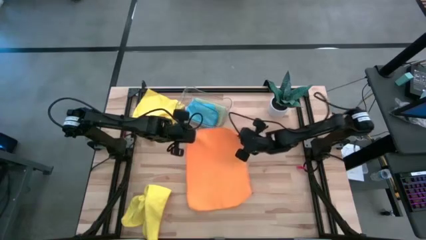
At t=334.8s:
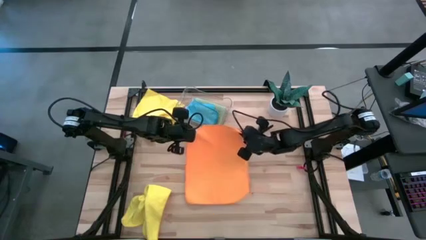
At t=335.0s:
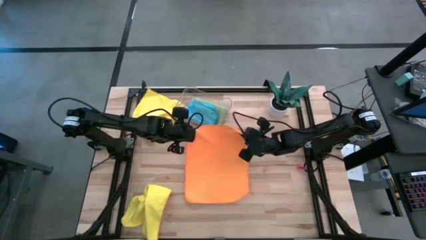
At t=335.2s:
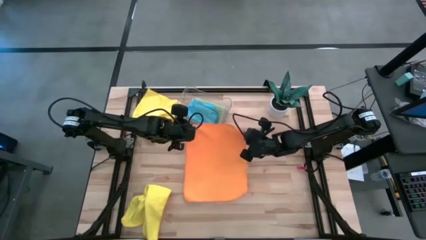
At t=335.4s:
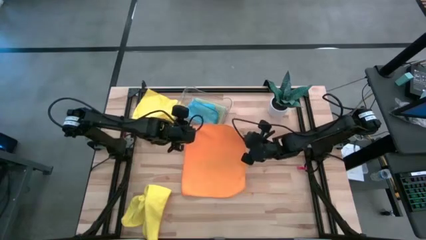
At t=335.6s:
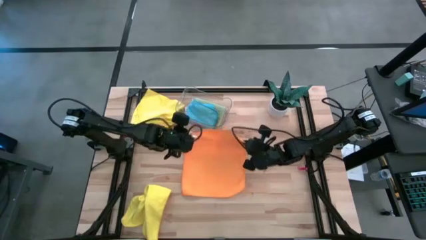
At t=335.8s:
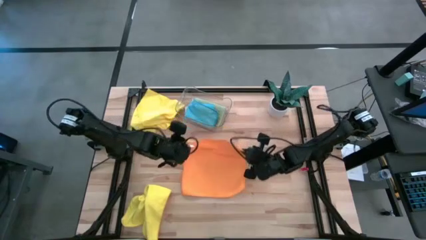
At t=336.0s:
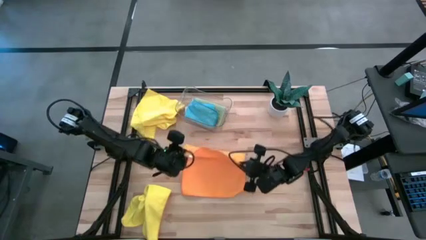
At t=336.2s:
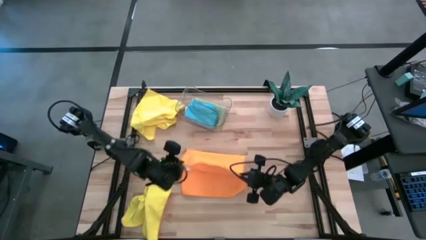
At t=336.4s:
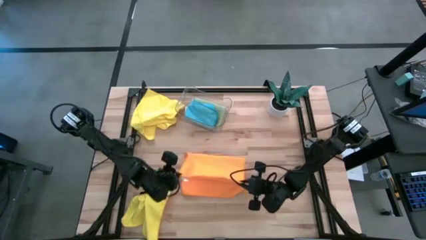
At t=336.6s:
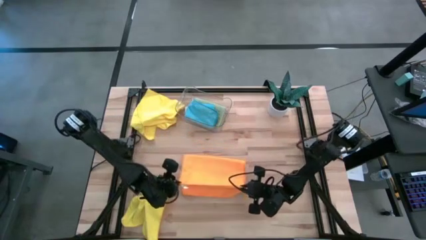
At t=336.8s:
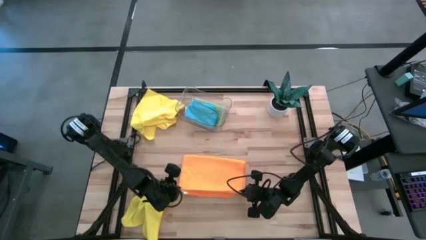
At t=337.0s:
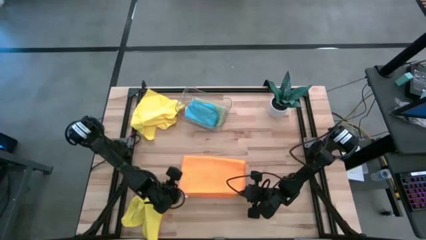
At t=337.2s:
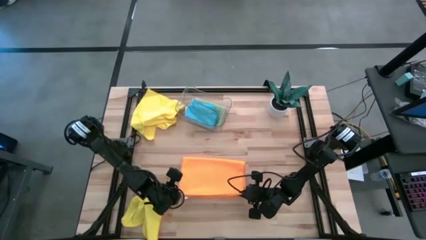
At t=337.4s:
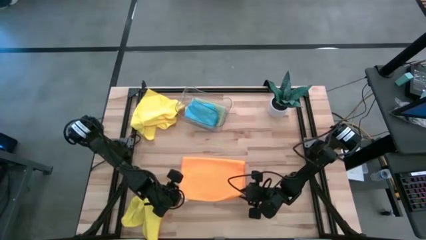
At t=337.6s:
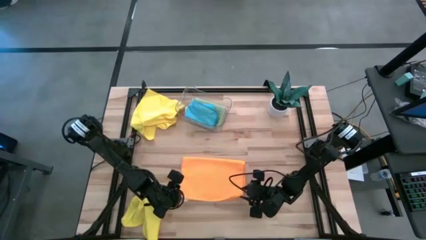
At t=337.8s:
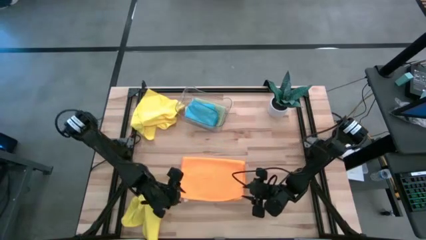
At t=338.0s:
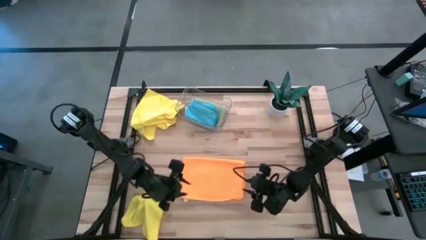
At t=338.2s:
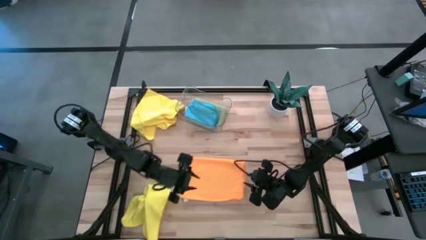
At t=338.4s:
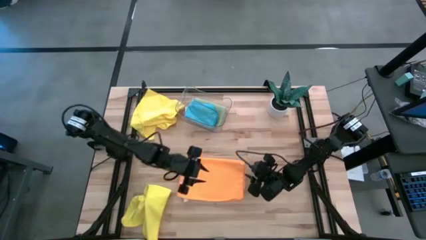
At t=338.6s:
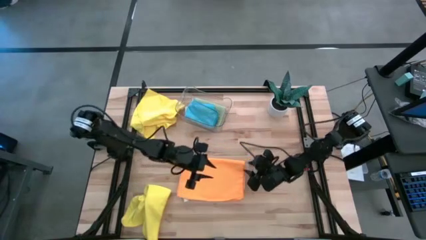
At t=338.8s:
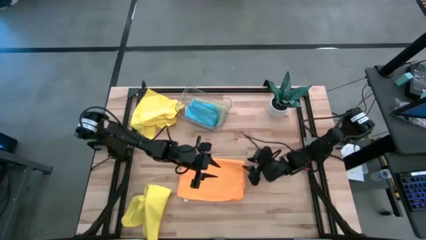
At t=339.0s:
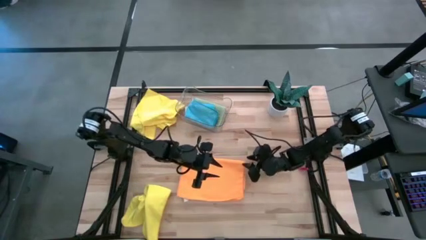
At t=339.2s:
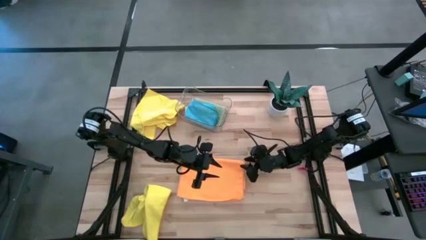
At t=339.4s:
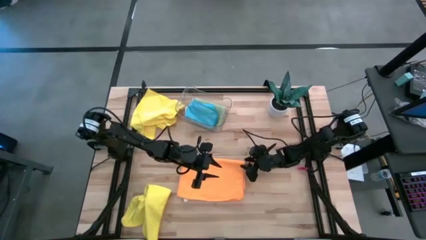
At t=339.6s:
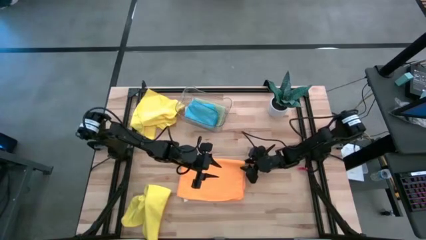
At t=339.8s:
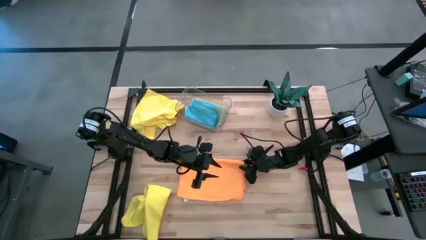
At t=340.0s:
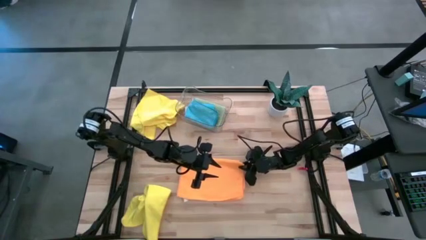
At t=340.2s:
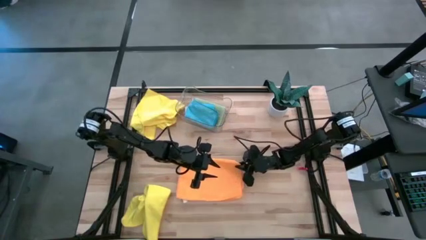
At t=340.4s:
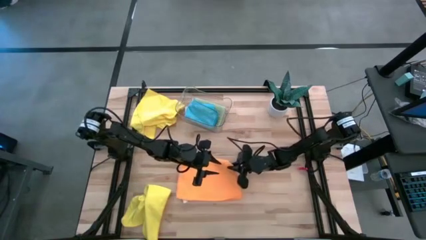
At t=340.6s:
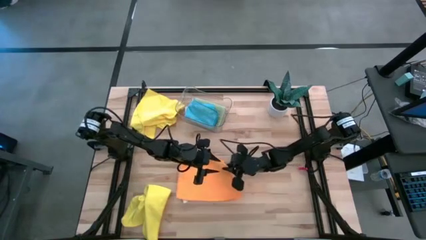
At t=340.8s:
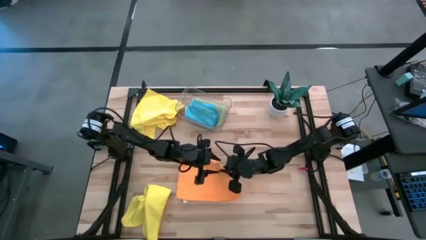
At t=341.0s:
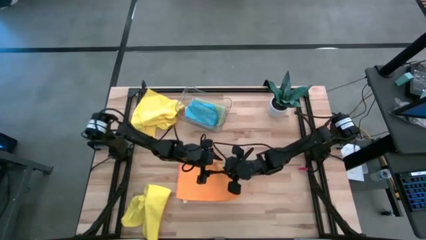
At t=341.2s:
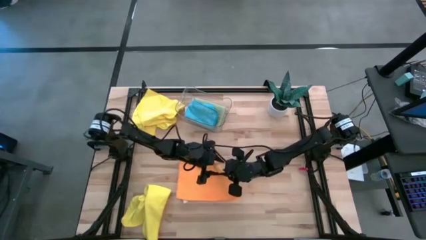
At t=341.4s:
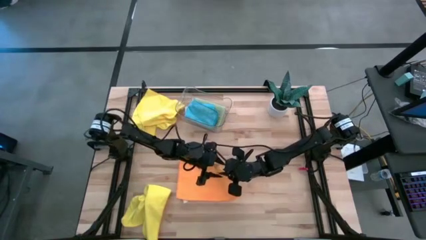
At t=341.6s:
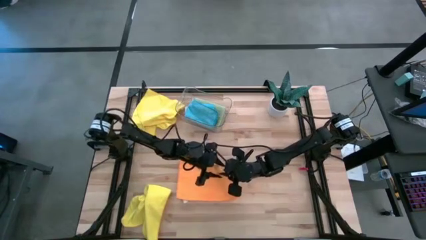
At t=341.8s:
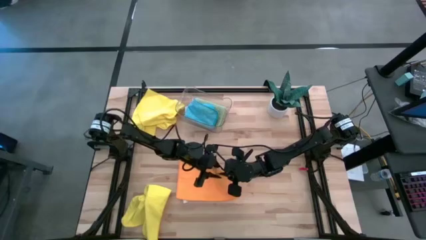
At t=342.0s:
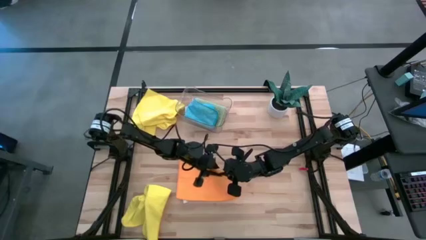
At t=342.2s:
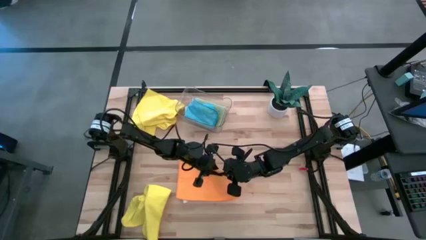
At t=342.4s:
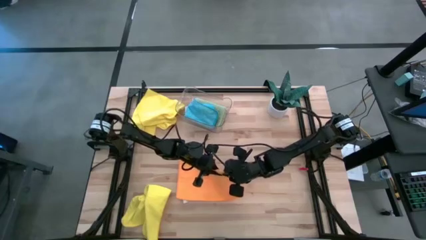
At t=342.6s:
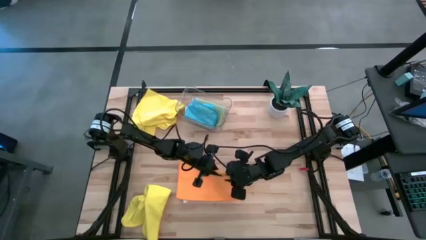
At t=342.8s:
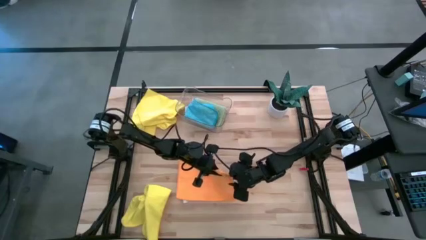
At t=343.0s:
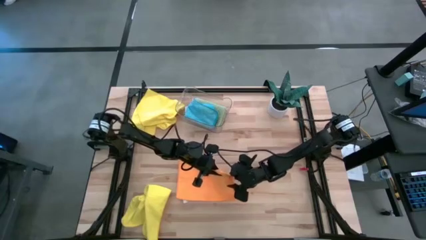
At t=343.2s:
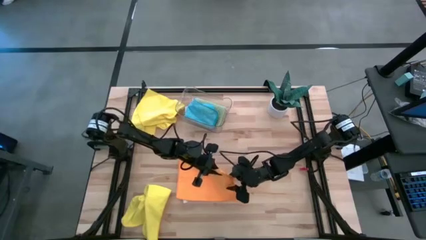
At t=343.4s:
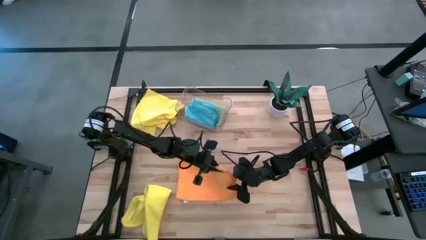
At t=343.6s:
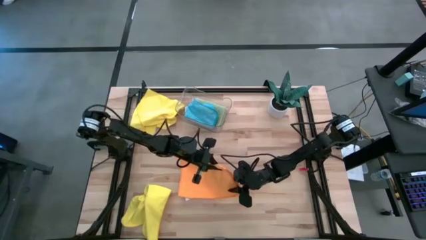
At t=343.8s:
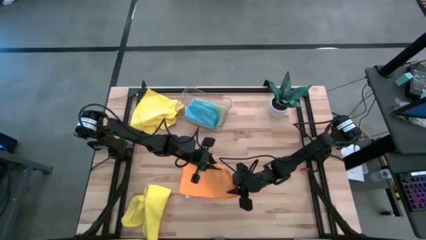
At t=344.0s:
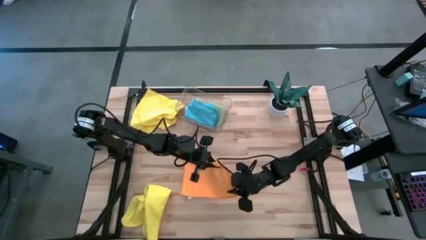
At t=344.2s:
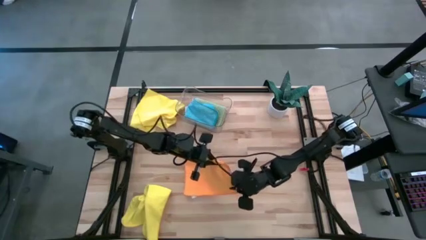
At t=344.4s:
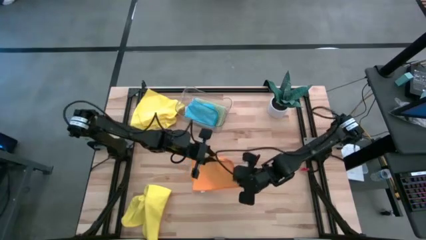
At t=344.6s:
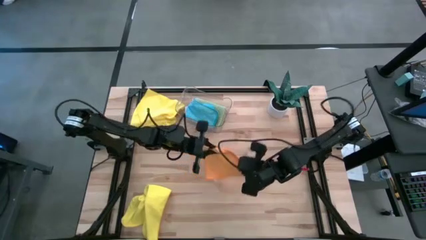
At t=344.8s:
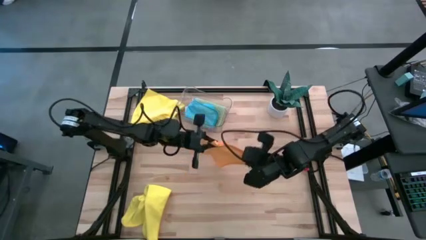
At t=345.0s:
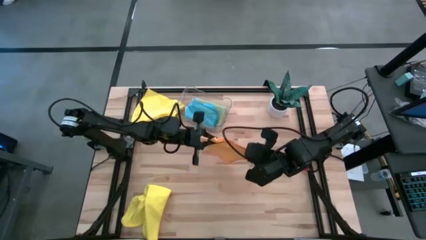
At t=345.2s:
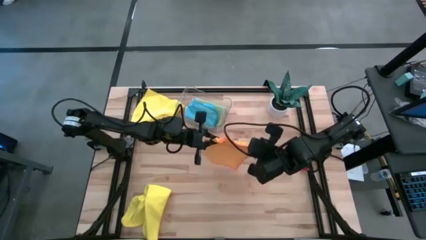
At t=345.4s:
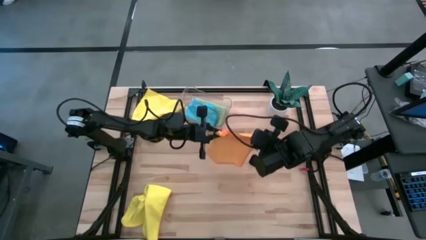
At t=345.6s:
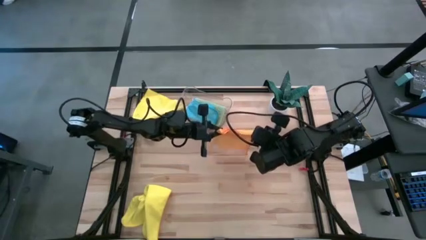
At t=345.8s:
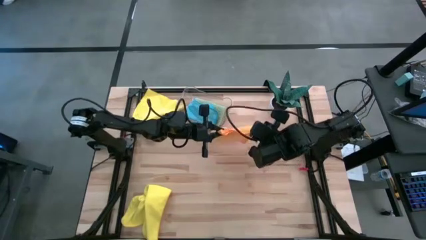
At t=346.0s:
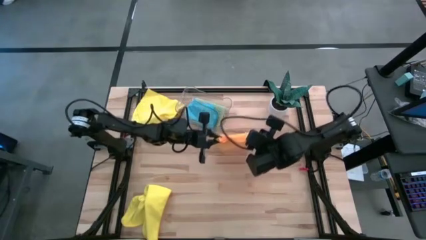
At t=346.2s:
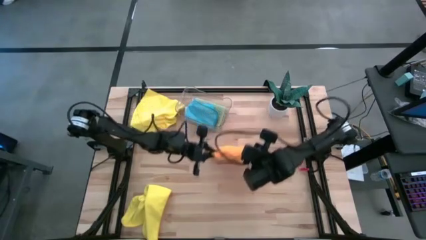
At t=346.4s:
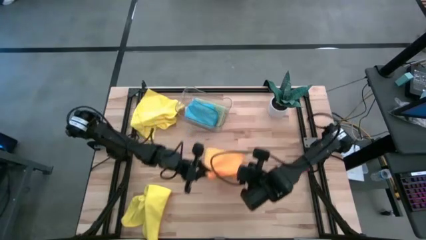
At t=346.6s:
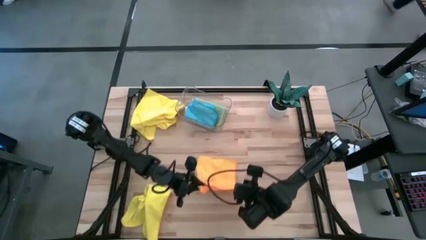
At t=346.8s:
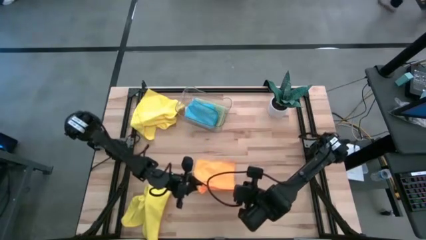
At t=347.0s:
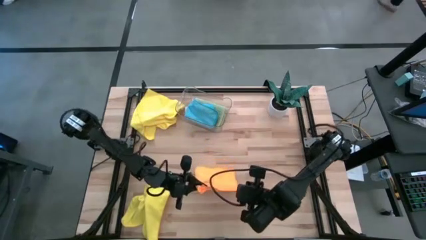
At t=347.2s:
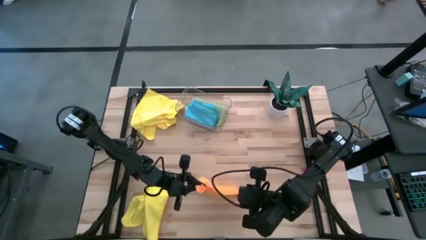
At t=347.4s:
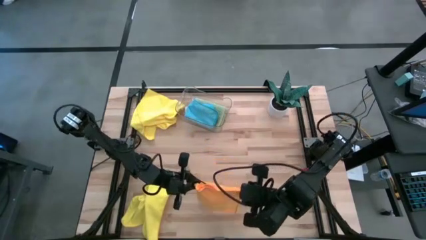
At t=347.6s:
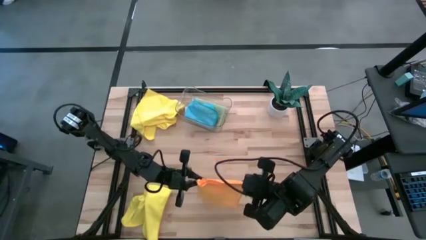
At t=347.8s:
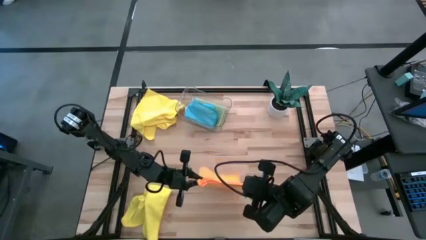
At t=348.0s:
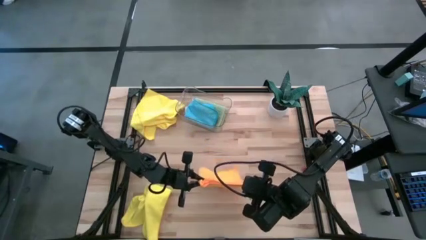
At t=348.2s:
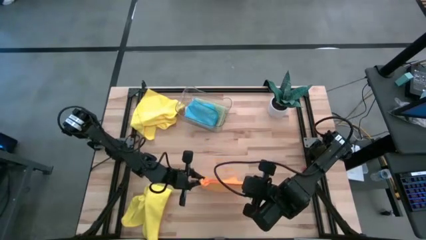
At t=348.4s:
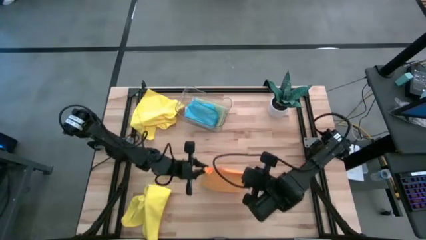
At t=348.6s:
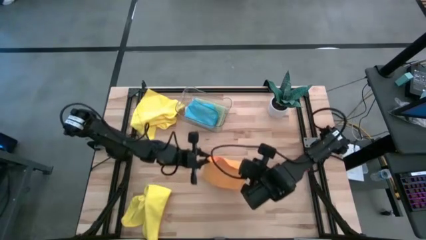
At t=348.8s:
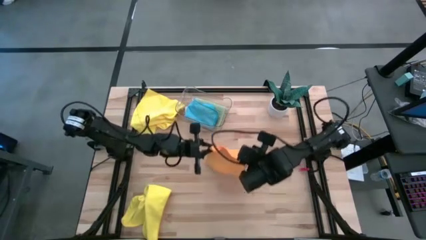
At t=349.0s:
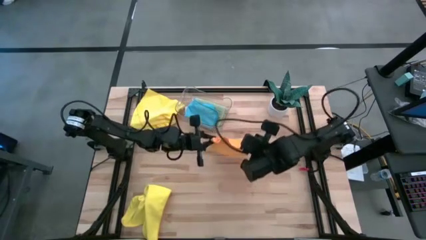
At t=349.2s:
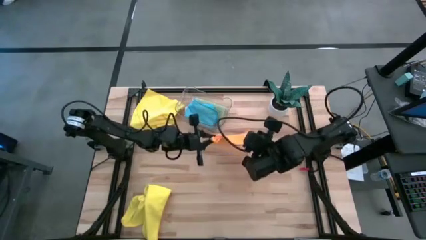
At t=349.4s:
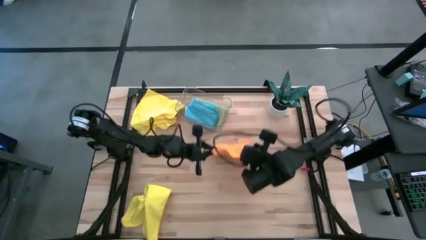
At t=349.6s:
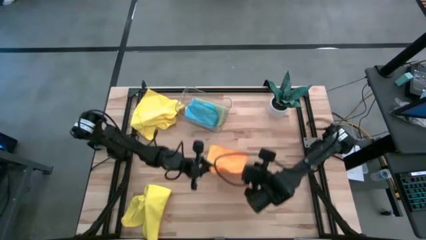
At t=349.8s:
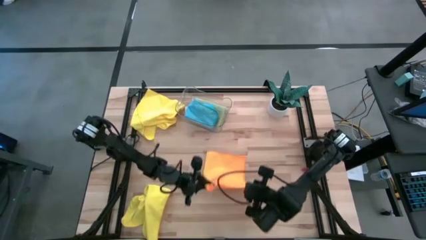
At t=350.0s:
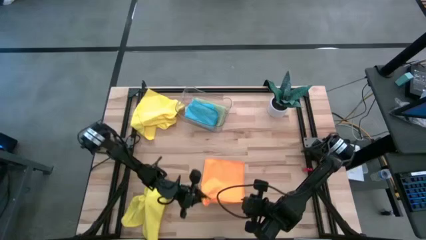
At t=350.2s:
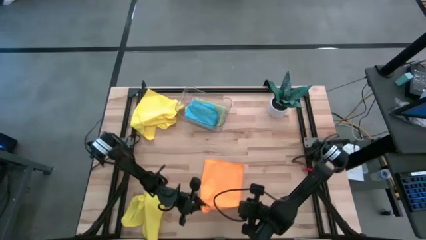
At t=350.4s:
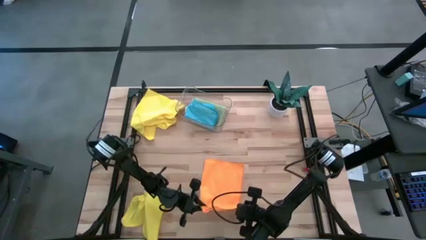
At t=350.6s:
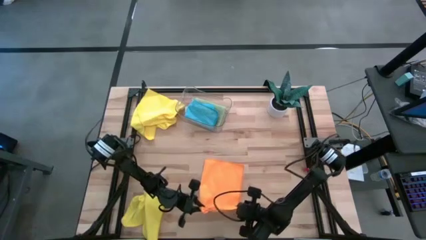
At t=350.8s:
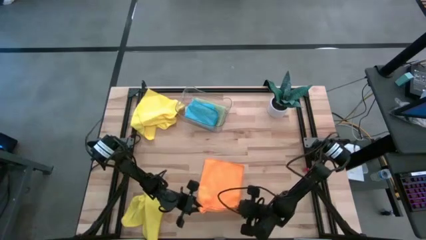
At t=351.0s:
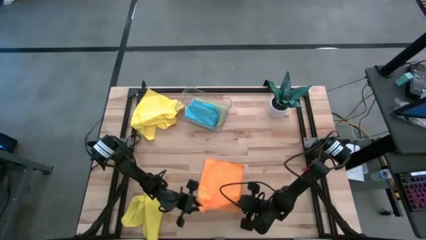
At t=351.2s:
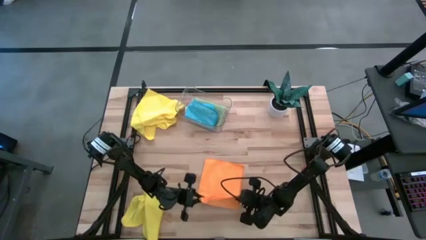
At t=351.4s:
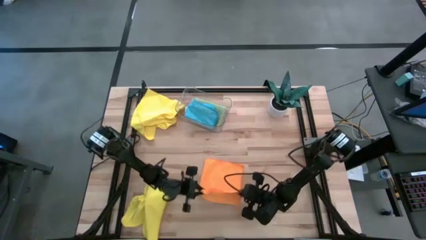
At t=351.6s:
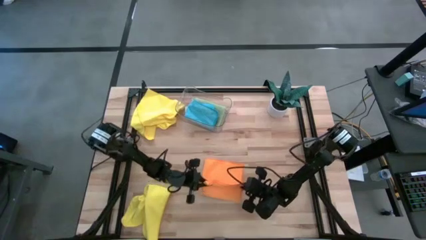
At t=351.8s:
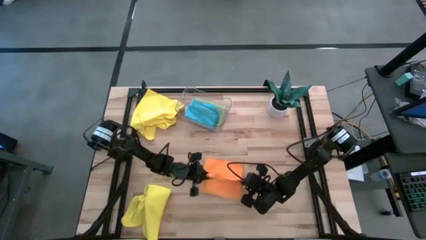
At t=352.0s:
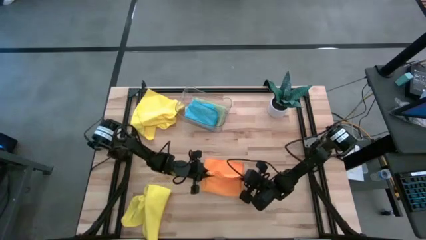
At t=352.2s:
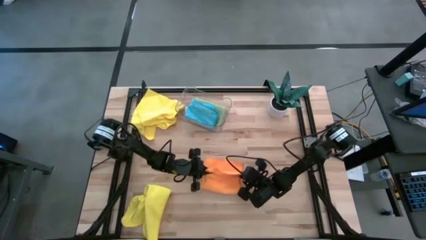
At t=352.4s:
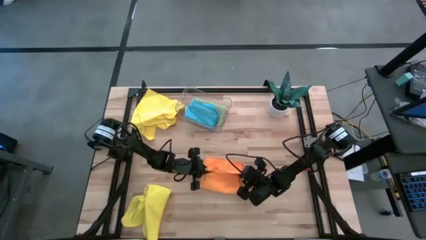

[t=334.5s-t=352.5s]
Task: Fold microfiber towels
Fold the orange towel
